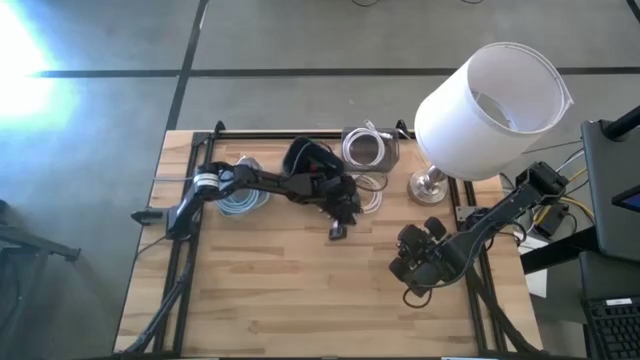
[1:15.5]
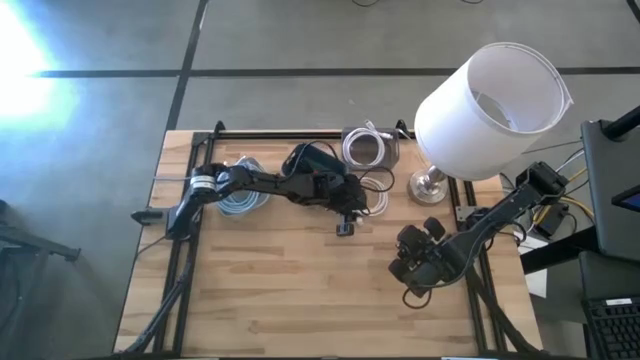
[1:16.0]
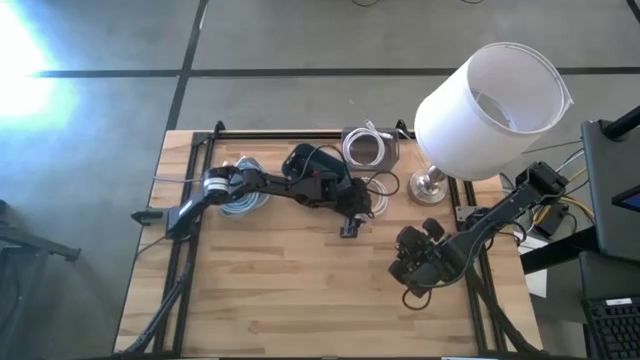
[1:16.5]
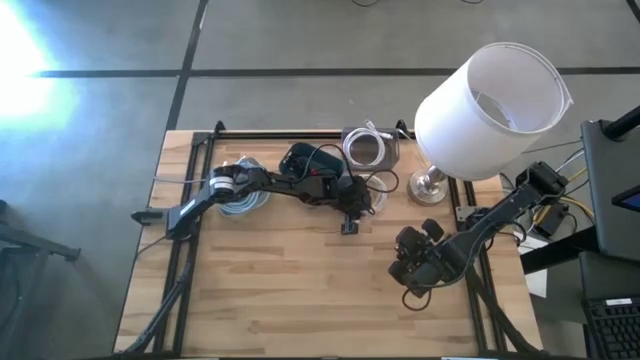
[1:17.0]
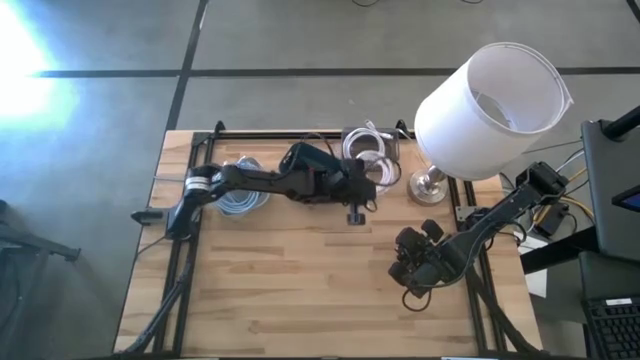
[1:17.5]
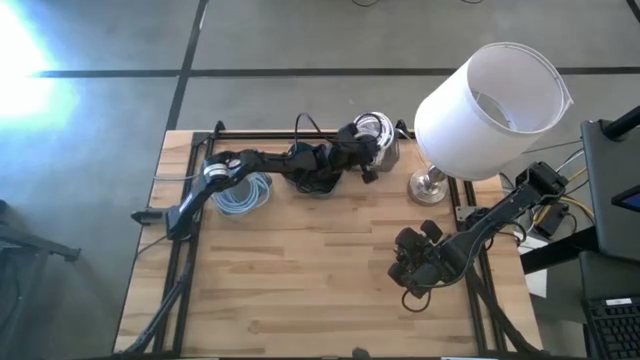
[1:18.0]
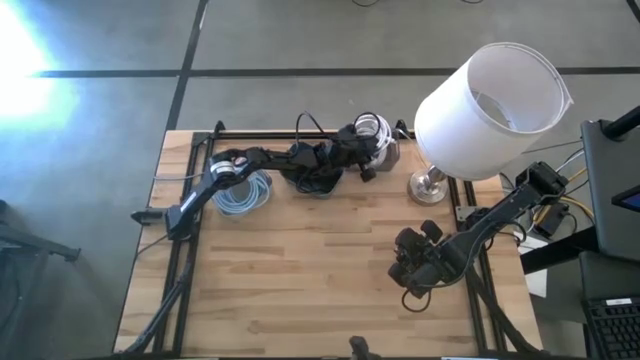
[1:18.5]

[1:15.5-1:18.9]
Task: Pick & Place USB Port
Put the white HDMI cable into the black bin

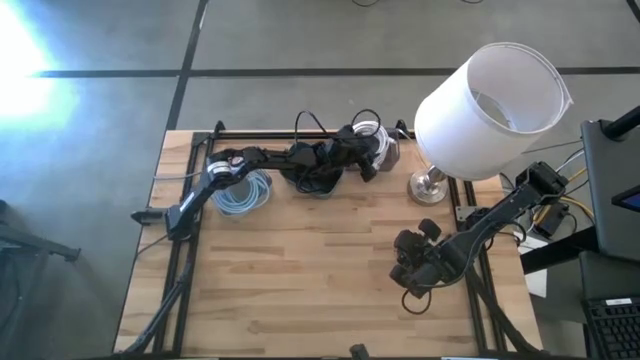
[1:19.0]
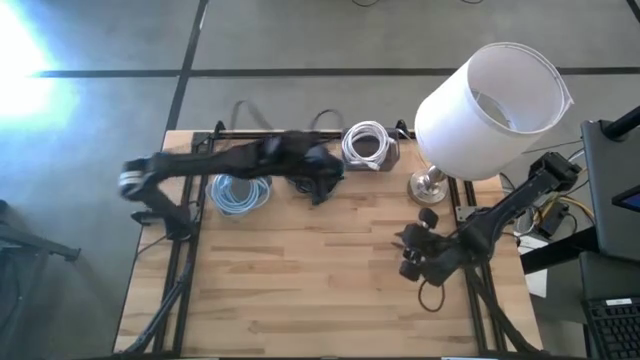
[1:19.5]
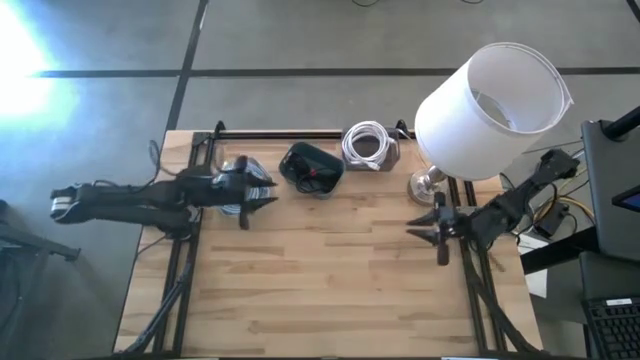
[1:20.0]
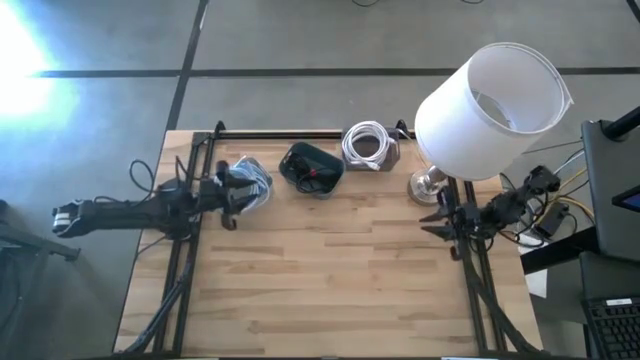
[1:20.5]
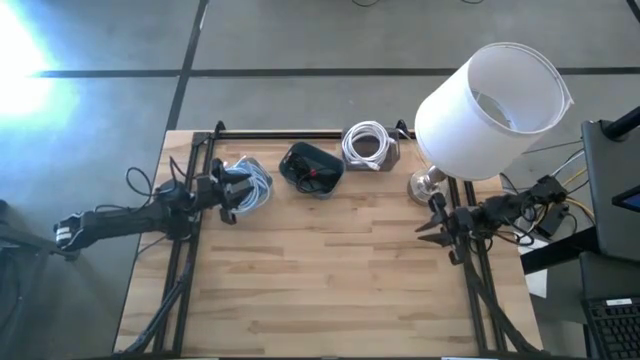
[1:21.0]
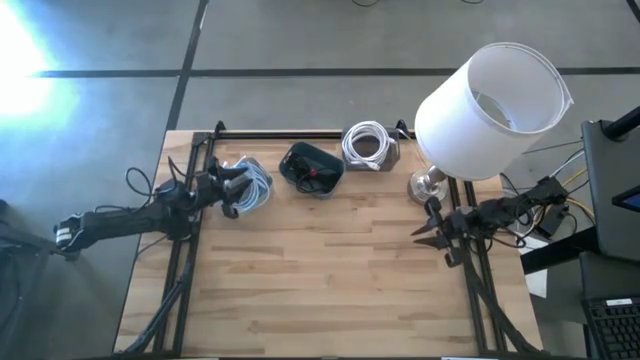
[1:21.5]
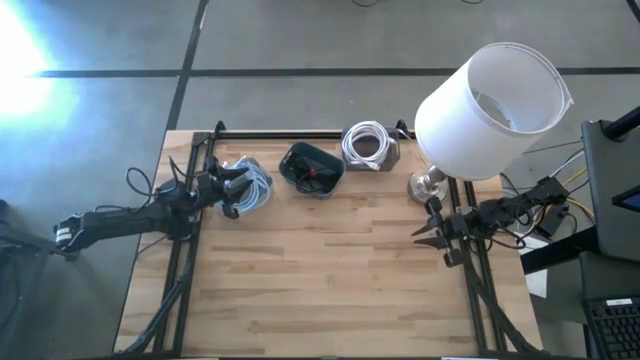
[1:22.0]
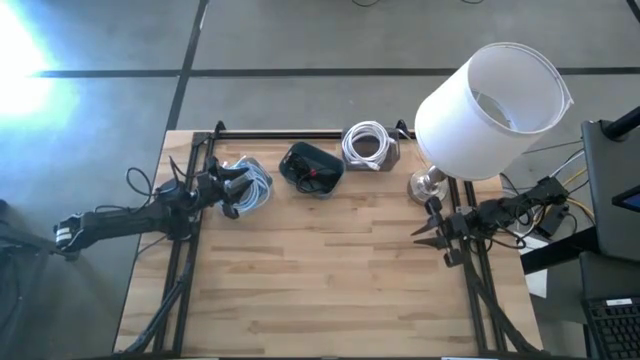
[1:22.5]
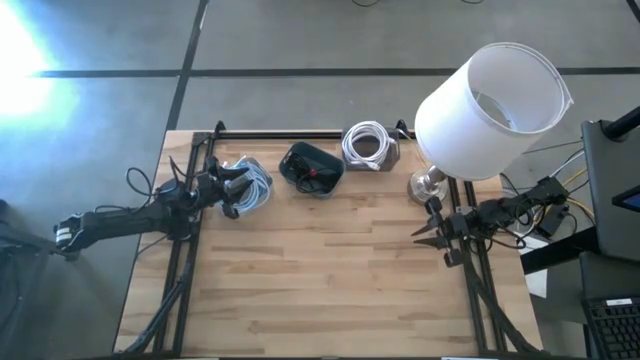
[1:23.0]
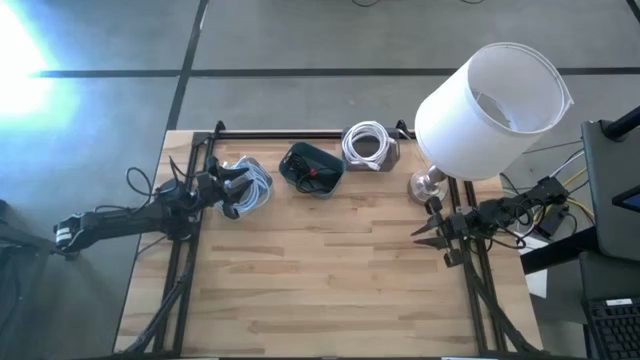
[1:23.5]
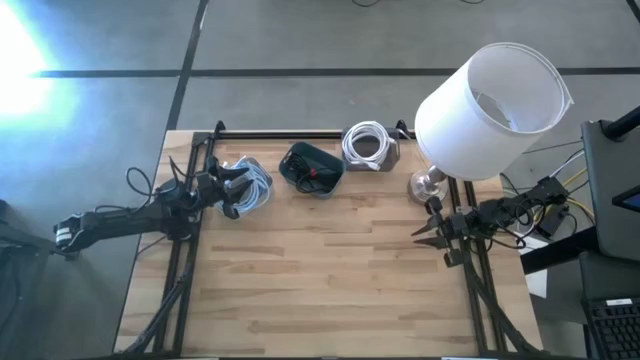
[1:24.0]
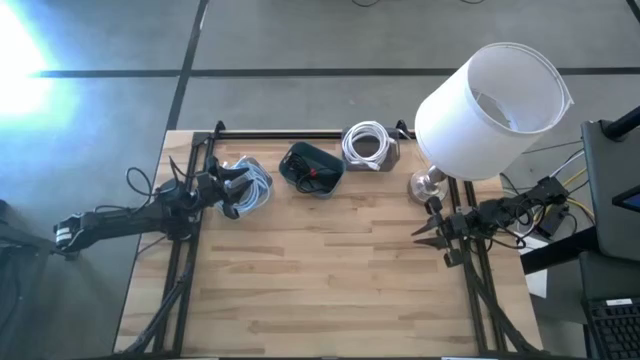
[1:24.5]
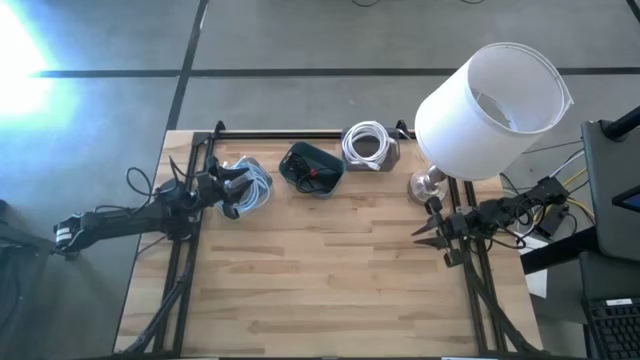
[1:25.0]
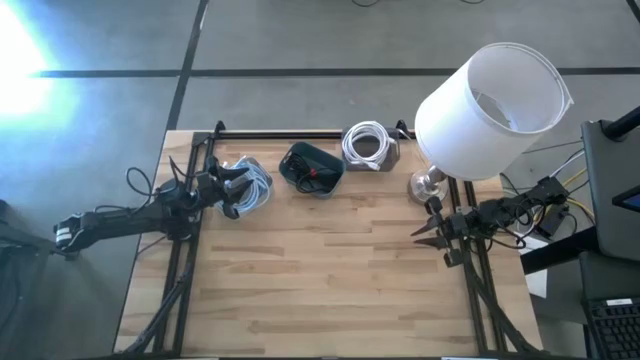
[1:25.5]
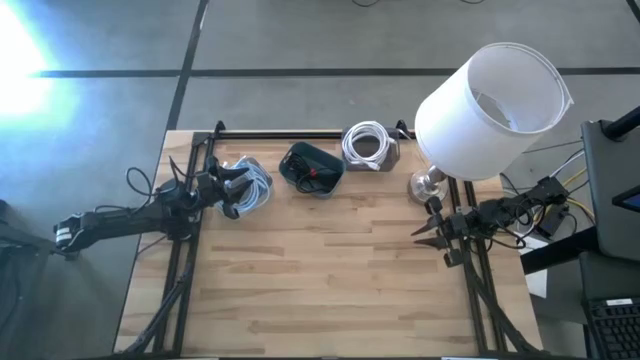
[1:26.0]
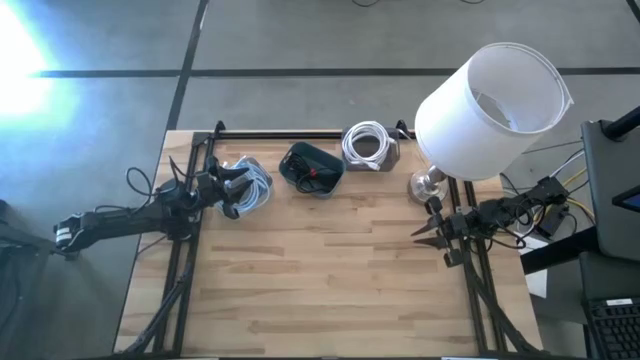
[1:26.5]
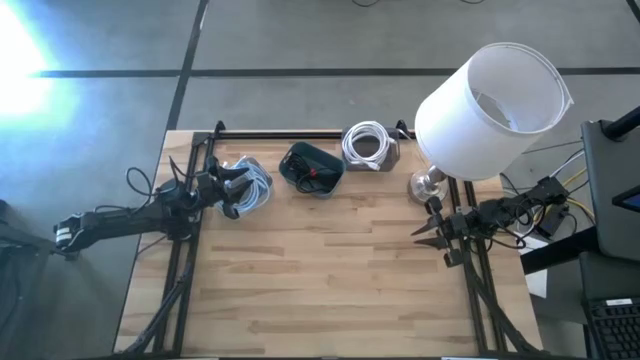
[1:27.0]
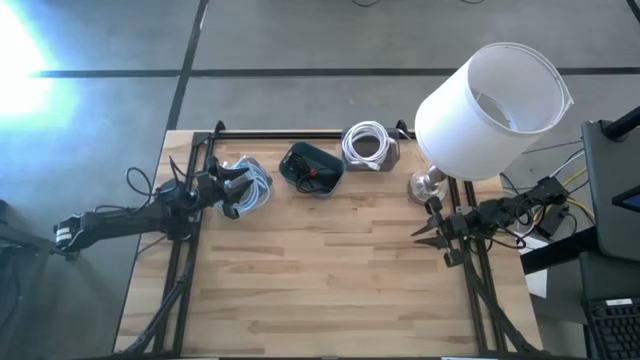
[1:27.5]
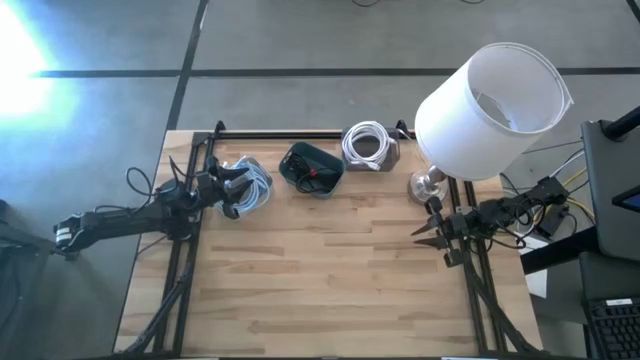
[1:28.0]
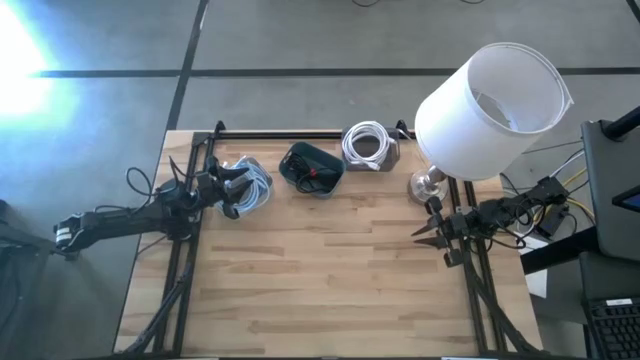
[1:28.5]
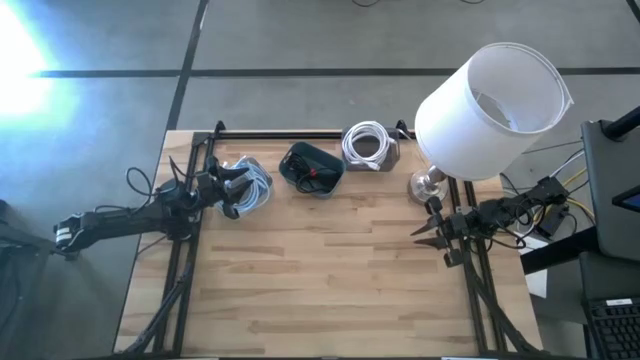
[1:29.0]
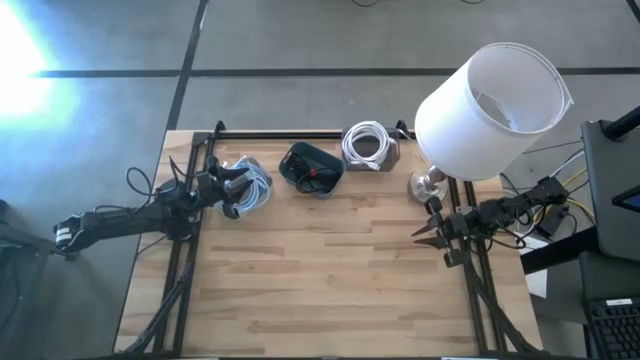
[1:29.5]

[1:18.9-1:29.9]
Return to Home Position

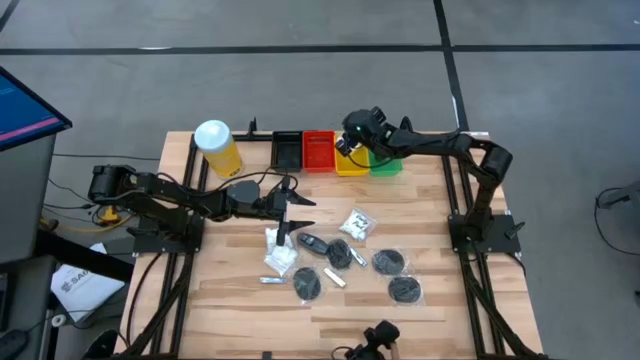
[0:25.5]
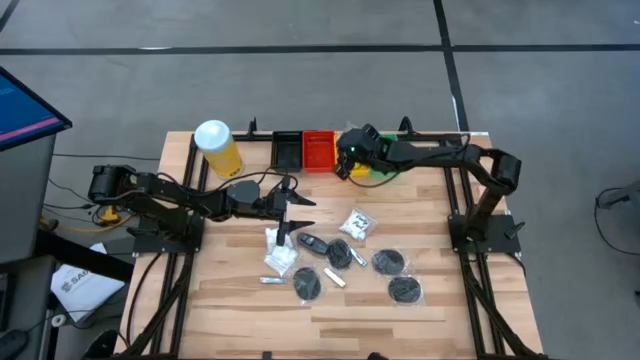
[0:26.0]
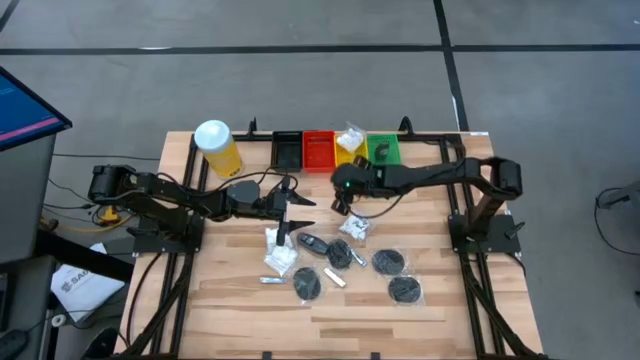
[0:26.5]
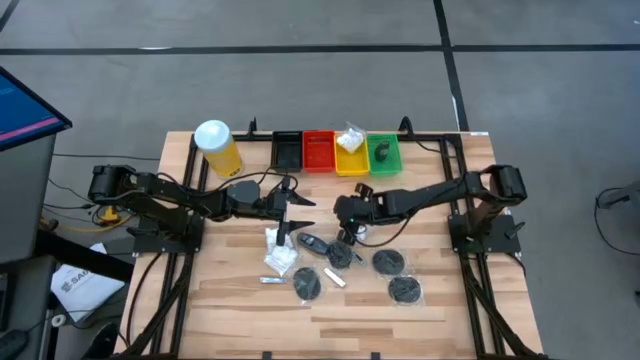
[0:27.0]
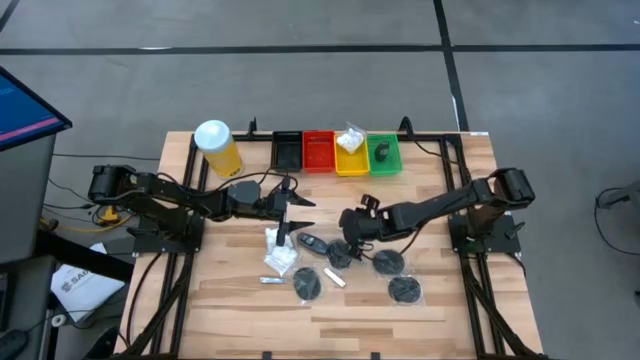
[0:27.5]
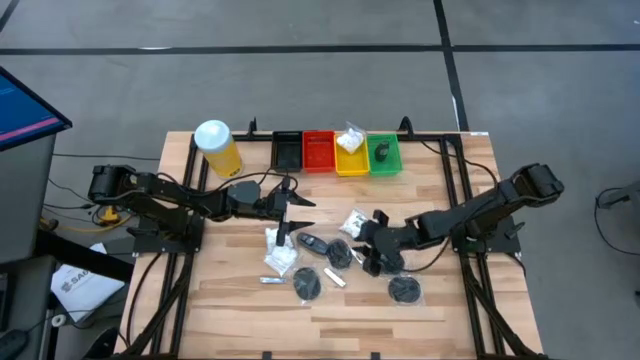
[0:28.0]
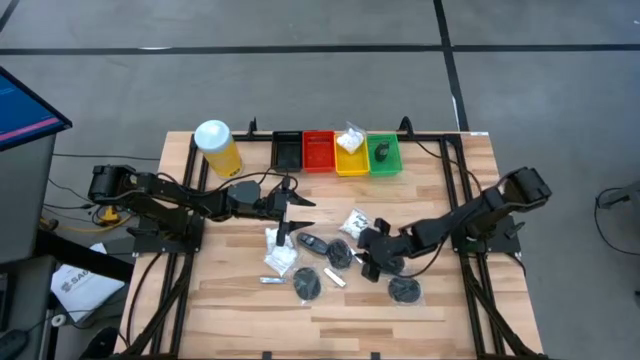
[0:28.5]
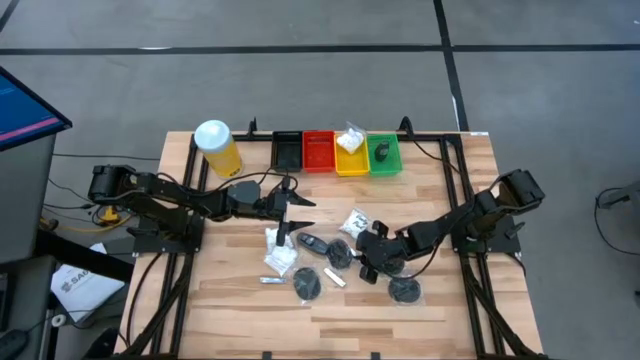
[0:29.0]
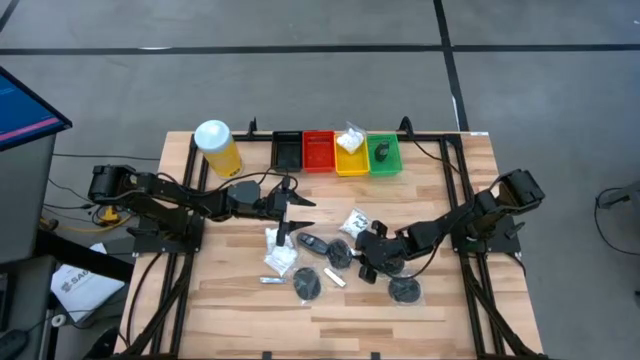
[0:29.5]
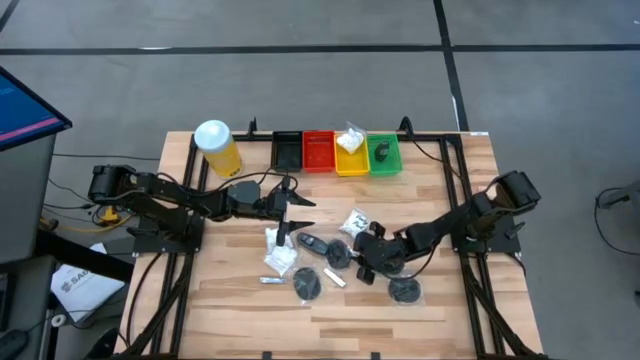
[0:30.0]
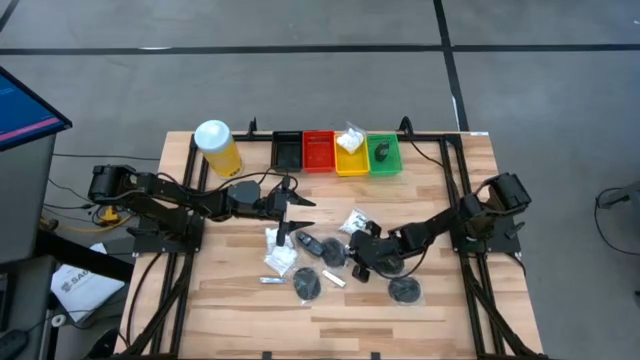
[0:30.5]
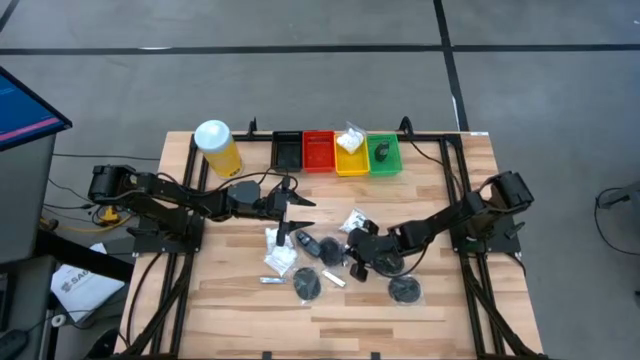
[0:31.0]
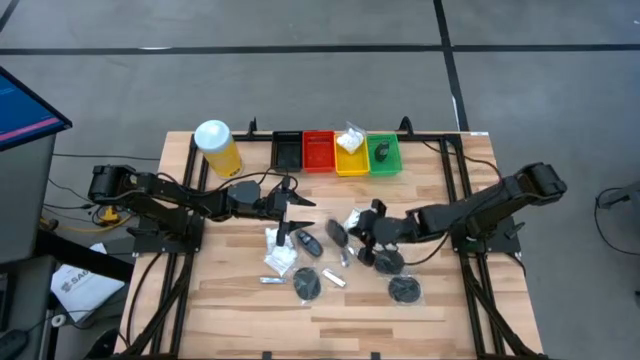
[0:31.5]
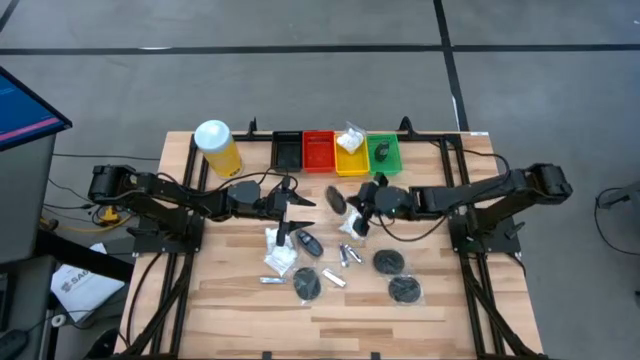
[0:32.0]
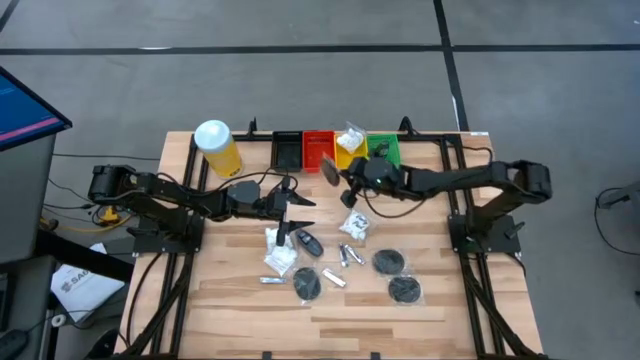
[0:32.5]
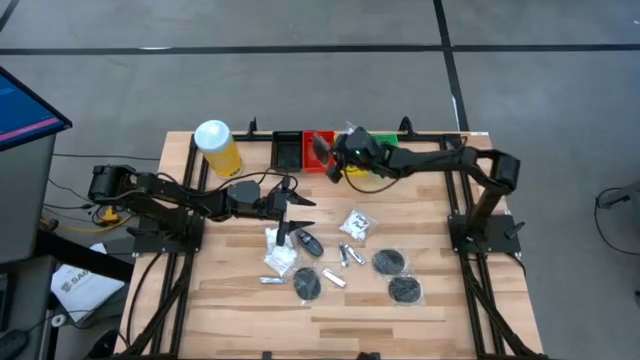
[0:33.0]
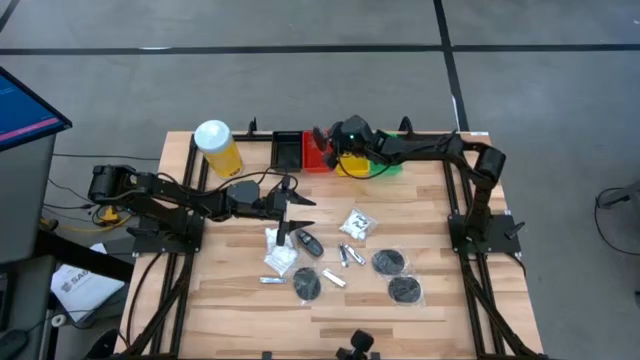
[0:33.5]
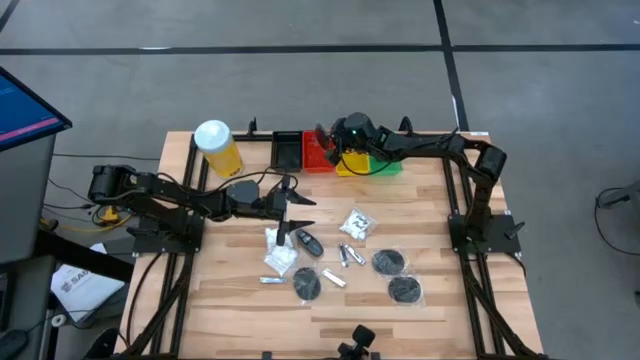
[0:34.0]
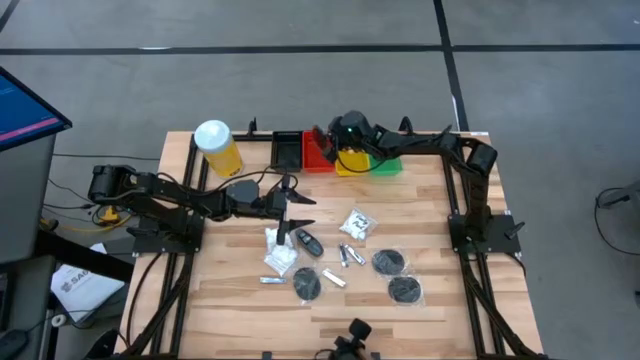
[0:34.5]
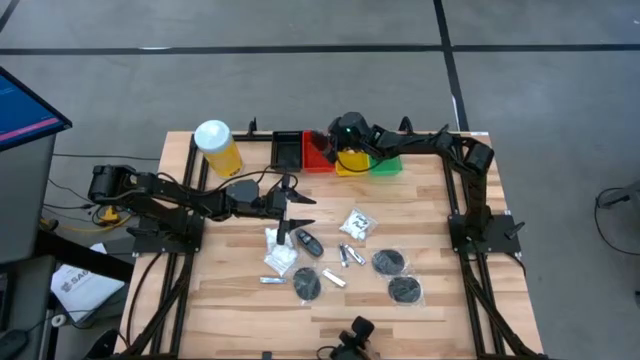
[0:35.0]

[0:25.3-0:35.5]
Task: Pick & Place Travel size toiletries
Put the hairbrush into the red bin
